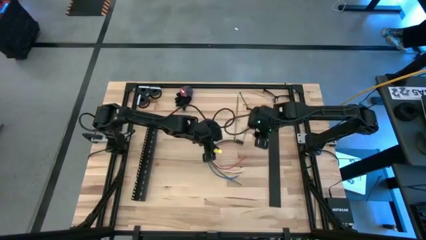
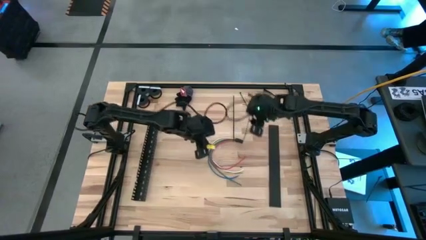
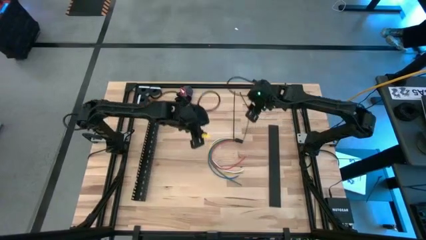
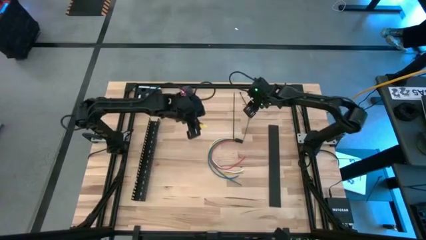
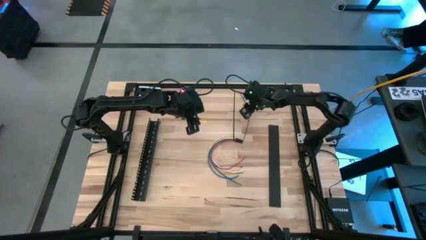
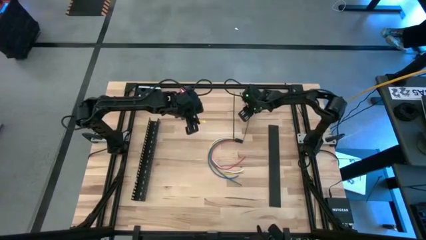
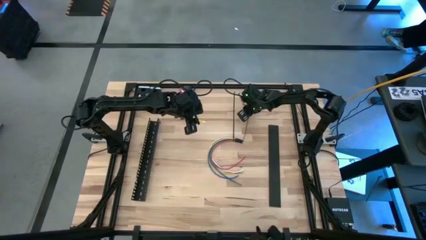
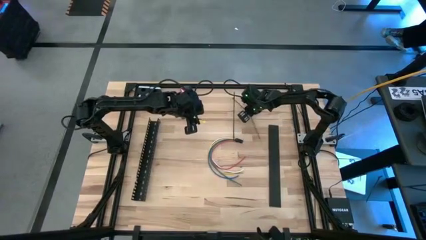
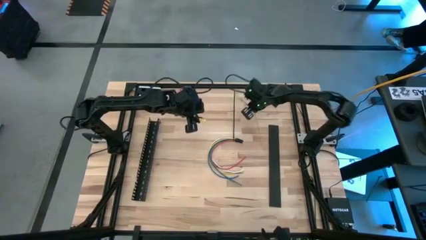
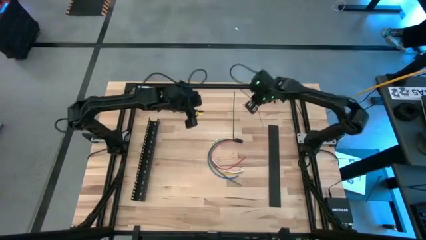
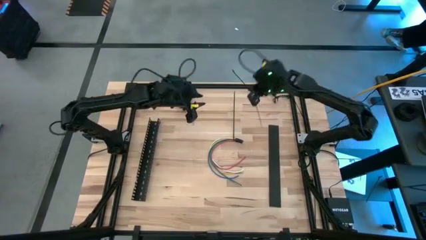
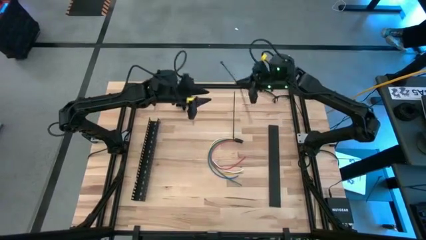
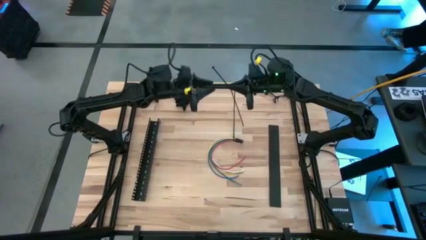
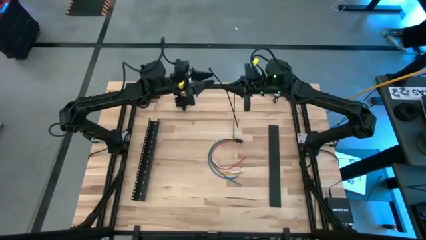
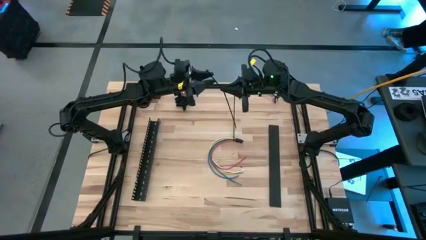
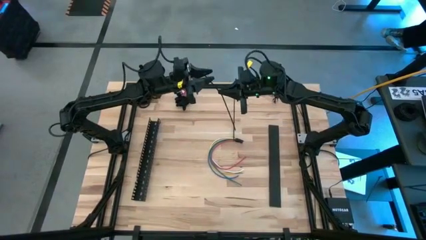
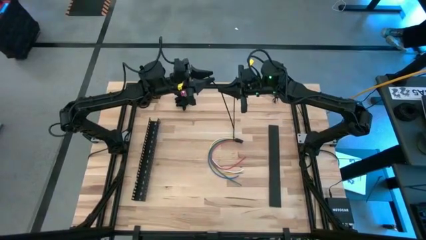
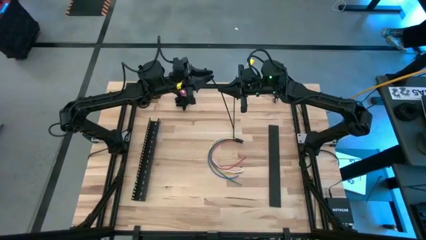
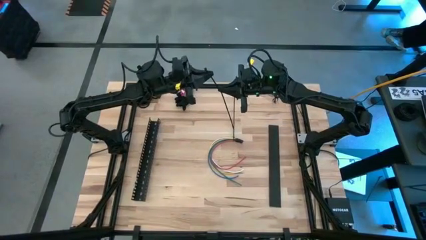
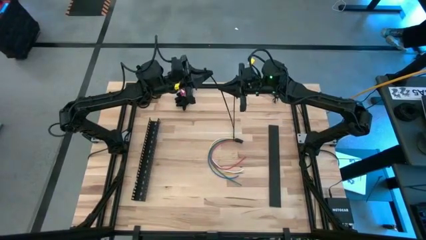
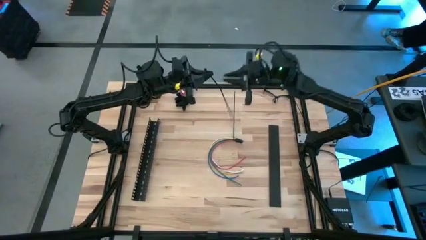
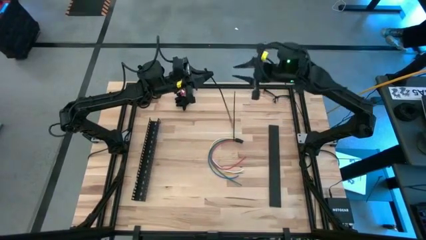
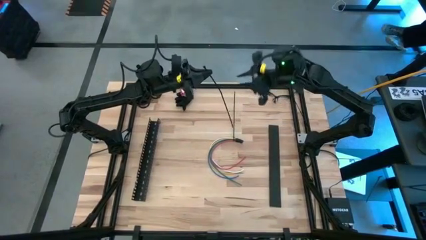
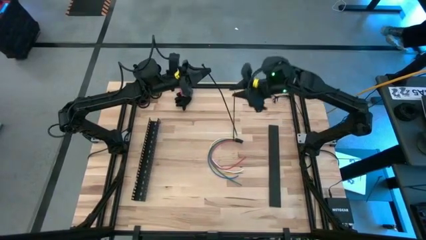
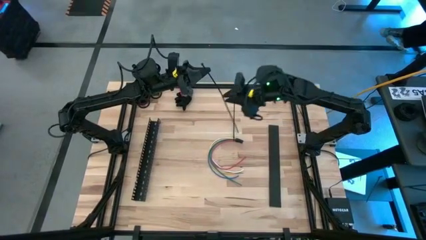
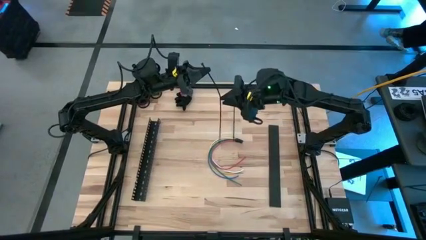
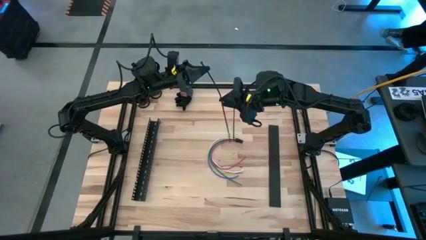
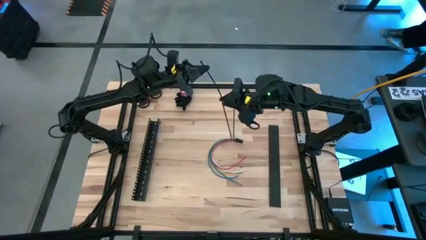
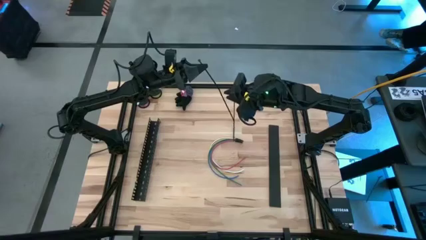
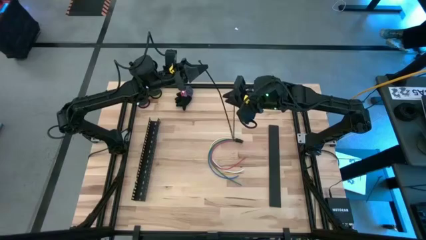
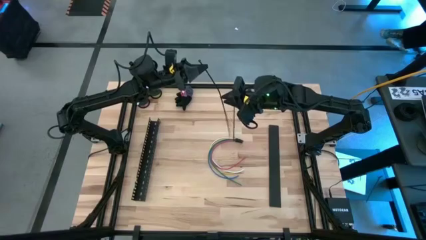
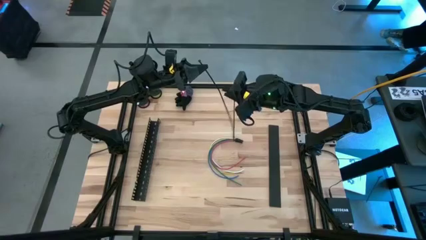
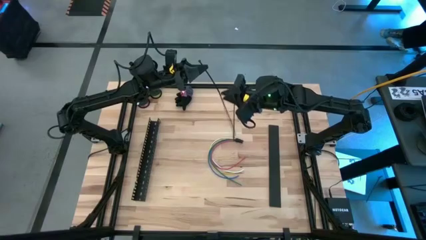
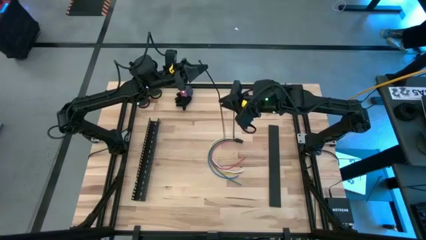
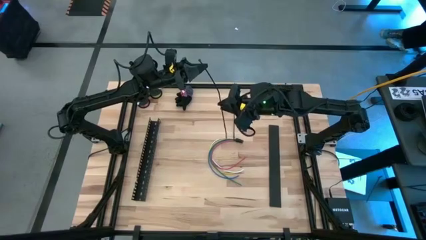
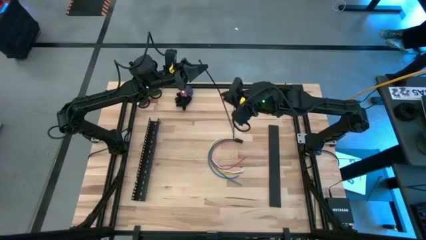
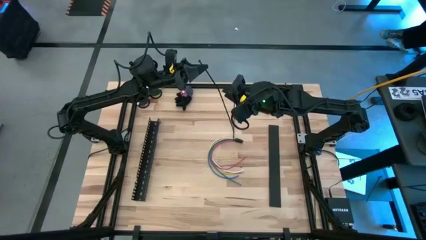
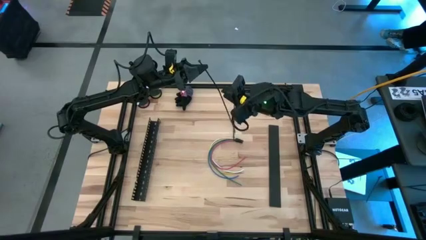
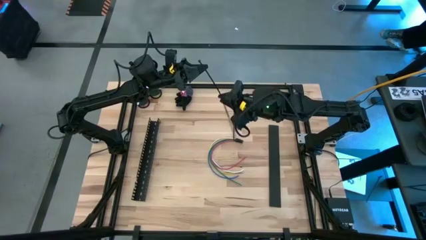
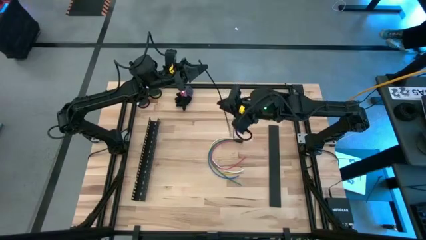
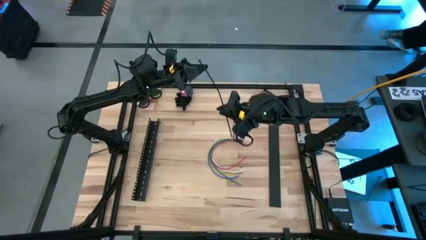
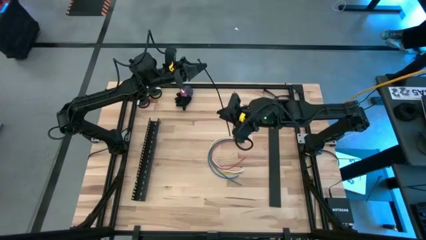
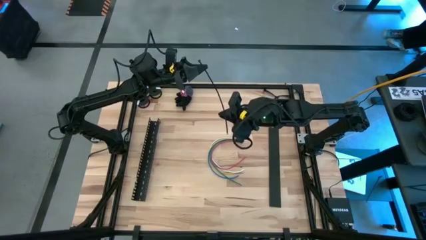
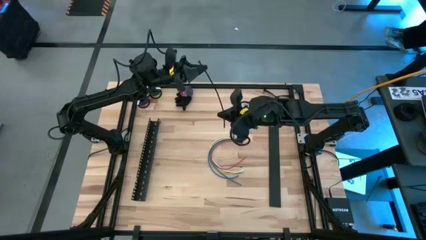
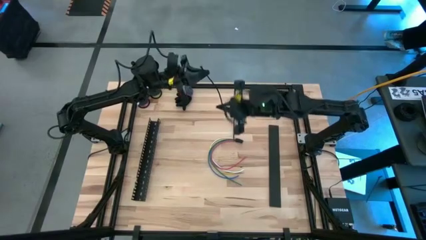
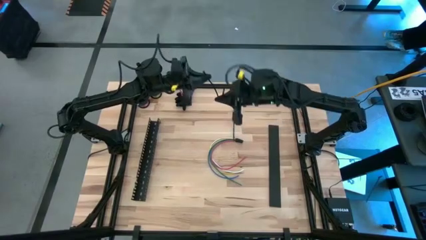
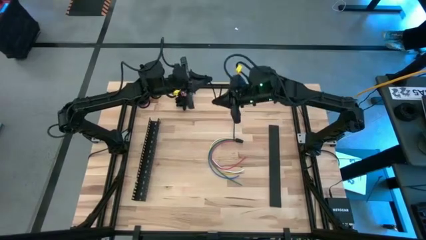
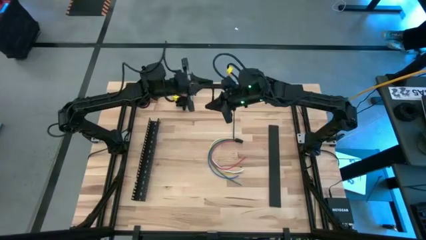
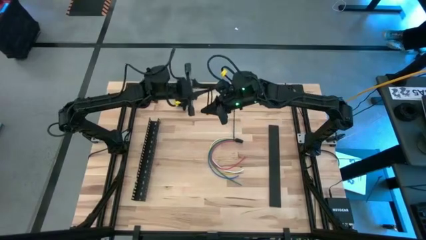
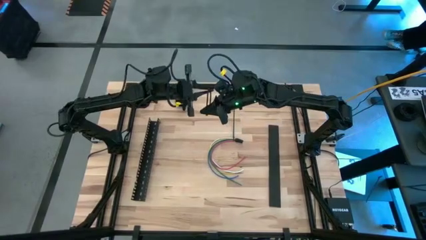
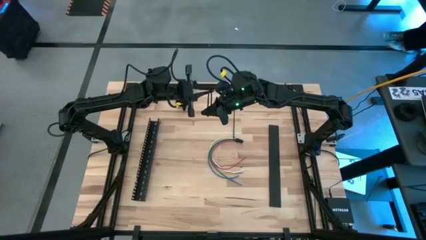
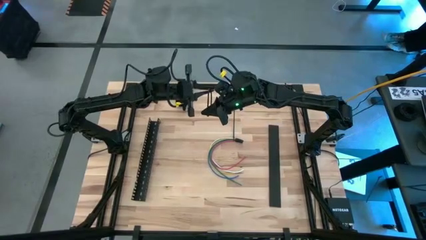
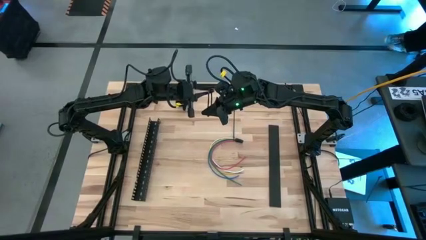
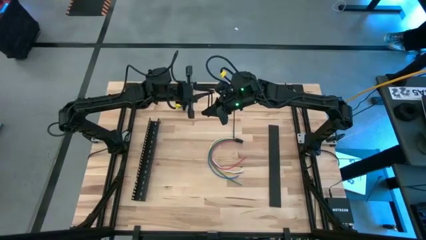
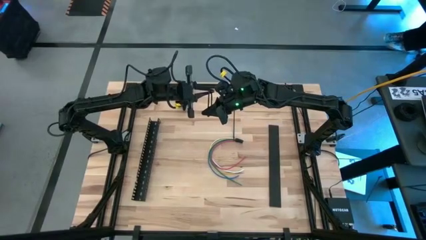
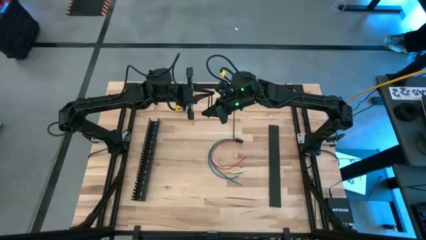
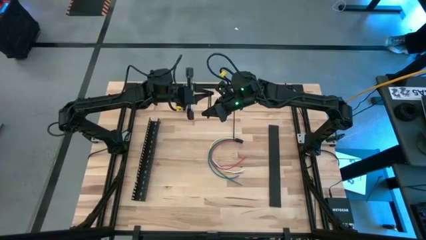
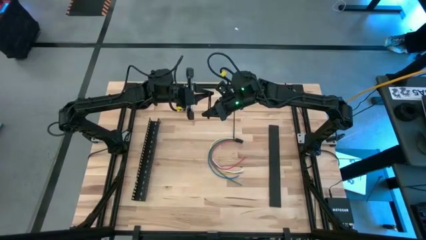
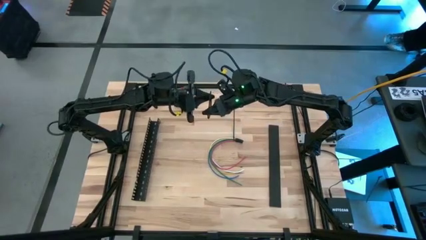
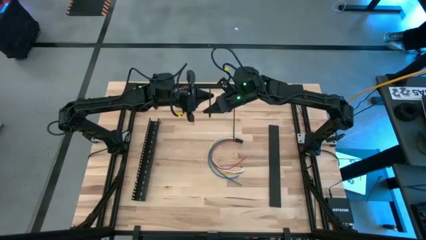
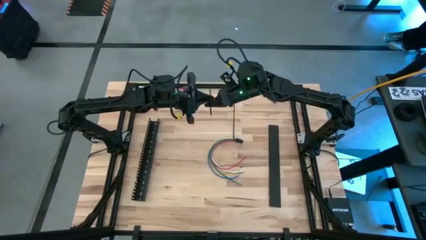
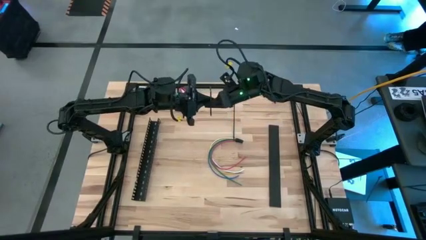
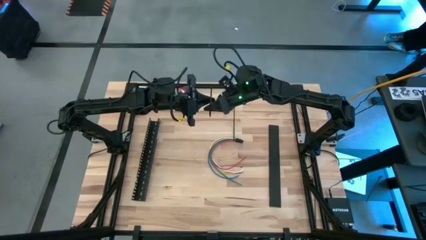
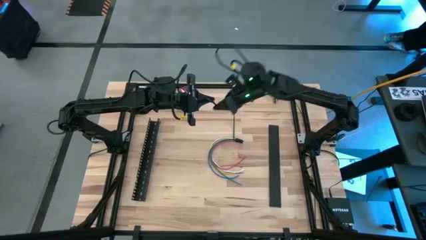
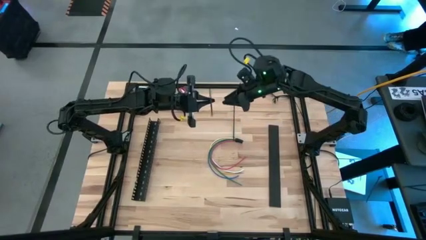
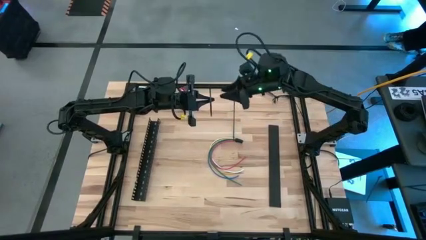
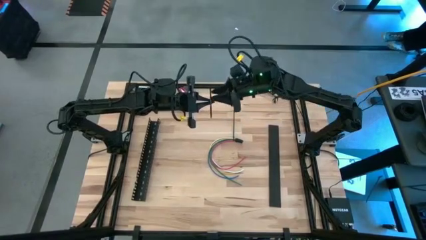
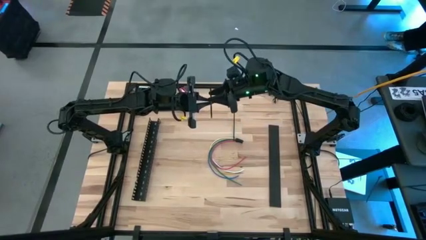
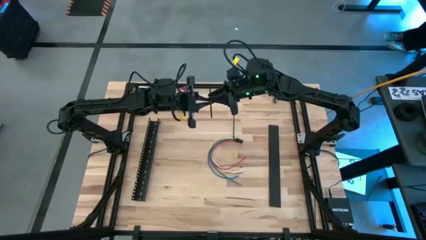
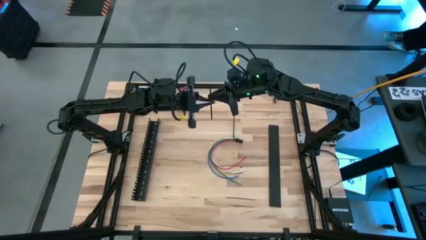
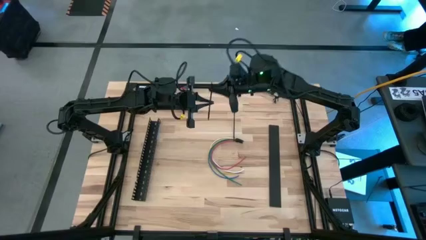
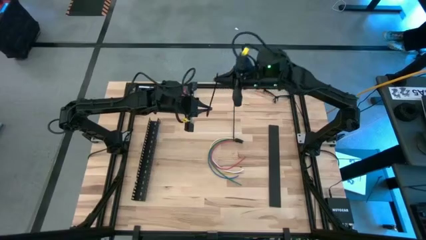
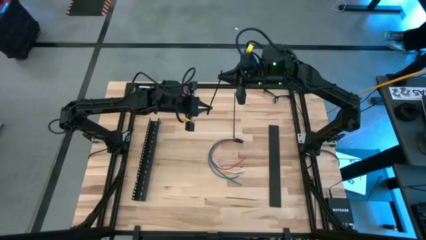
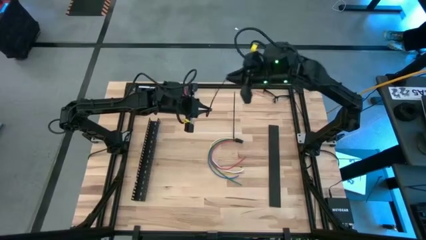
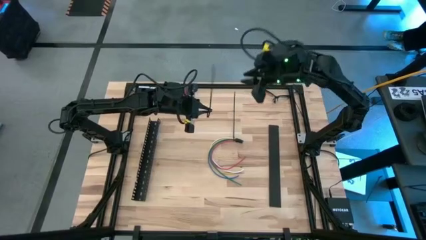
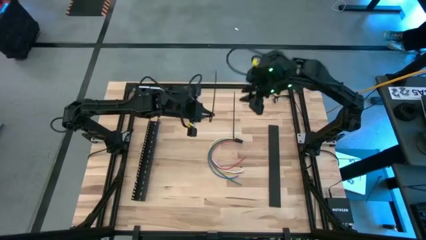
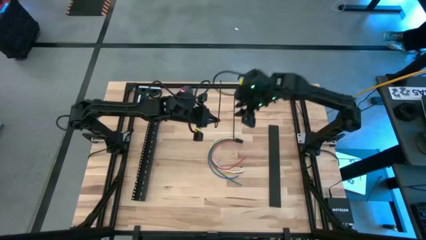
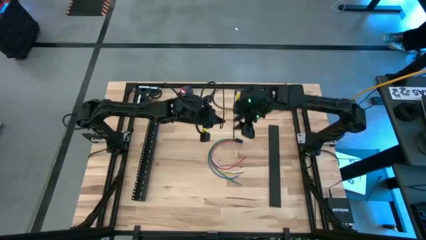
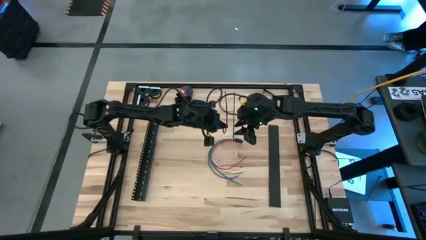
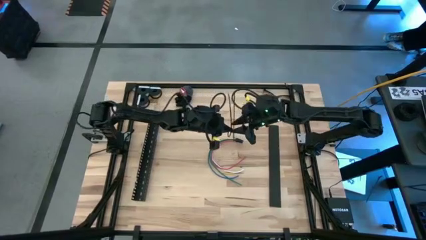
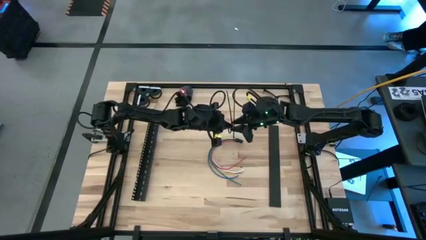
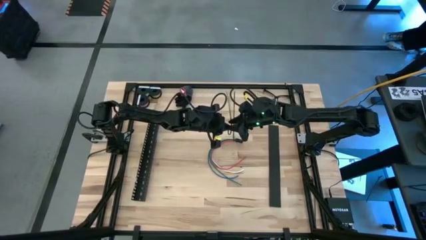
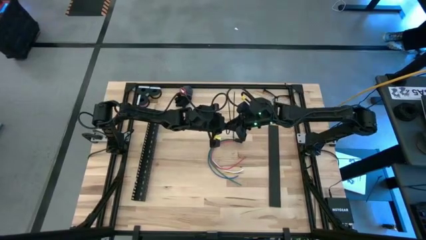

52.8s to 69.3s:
Task: Ziptie cables
Wrap the cable wires with the black zip tie
